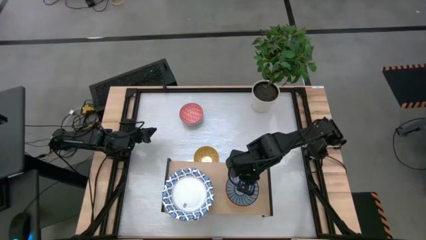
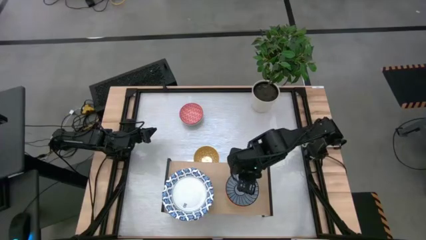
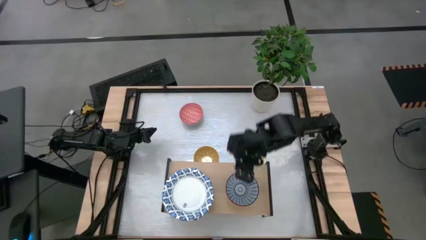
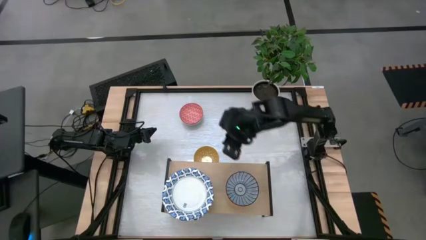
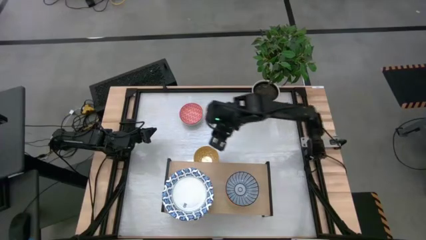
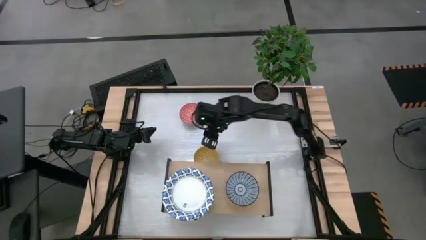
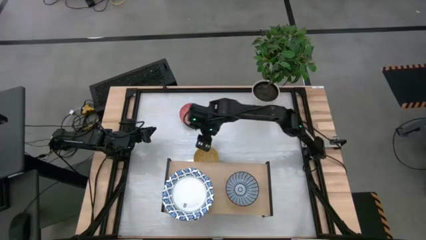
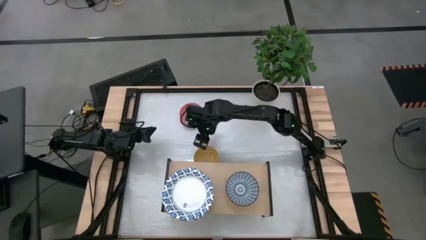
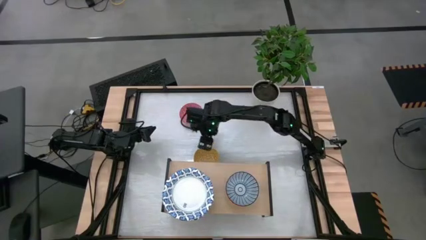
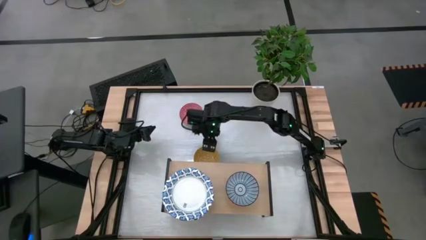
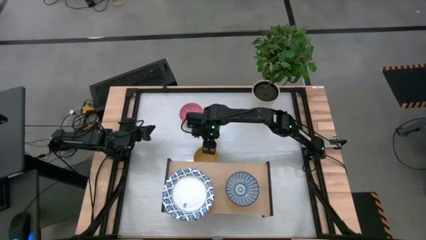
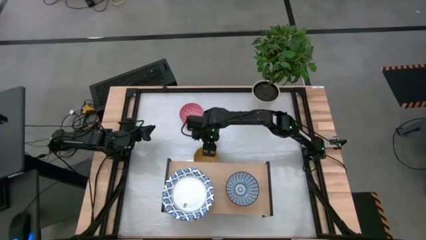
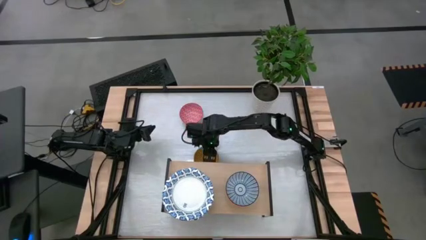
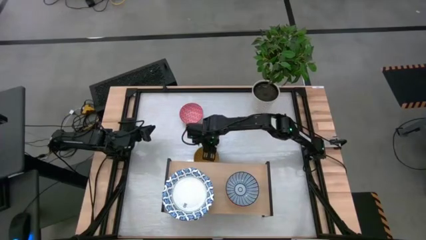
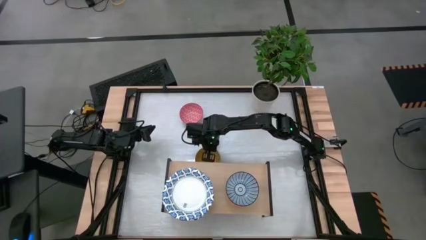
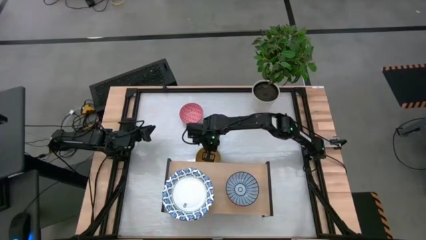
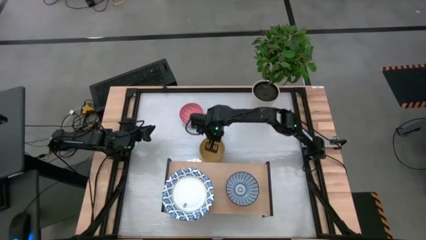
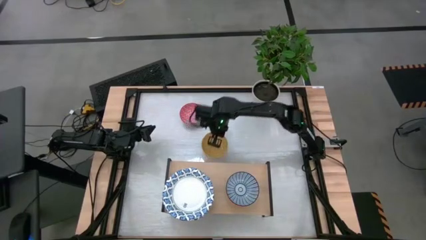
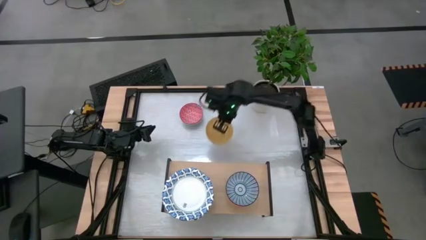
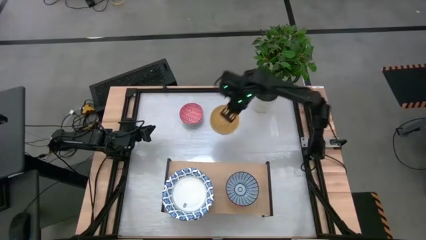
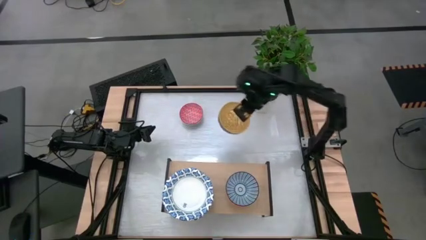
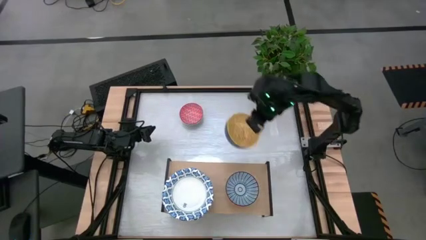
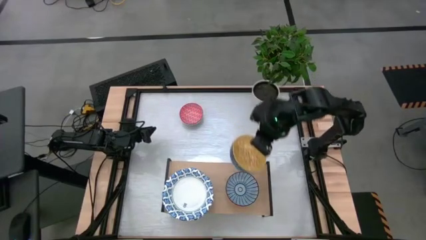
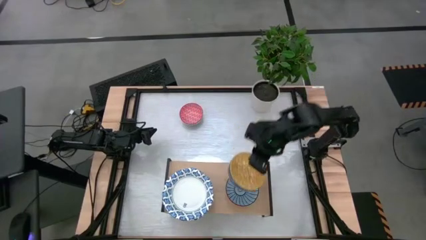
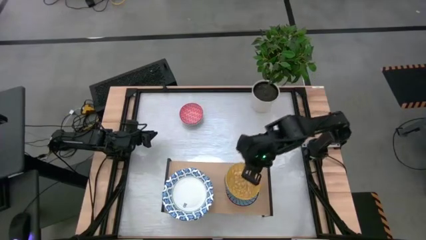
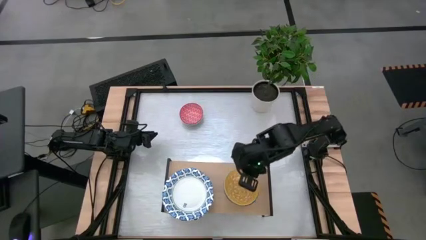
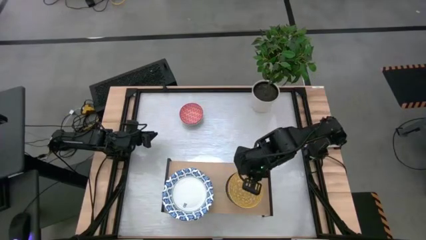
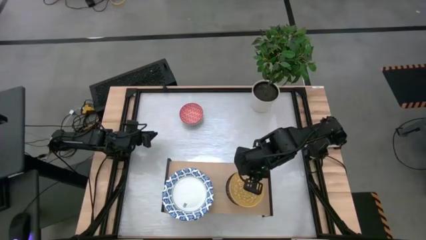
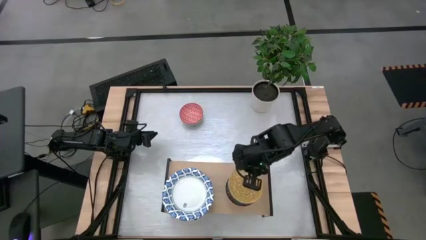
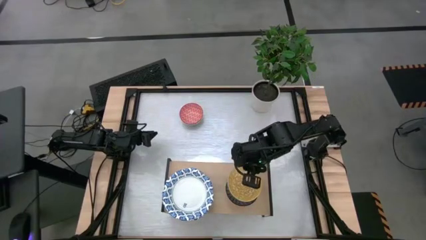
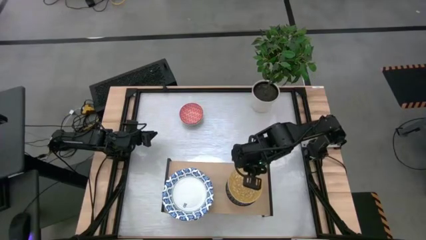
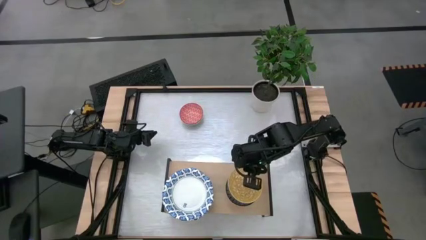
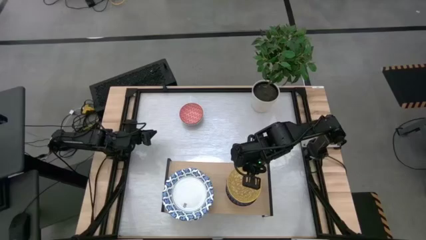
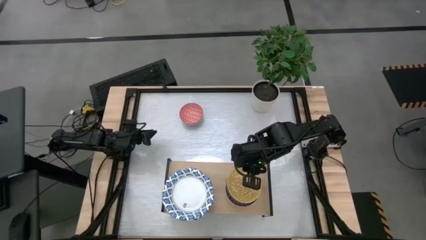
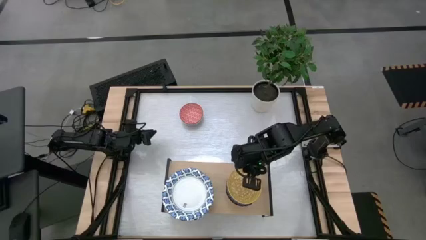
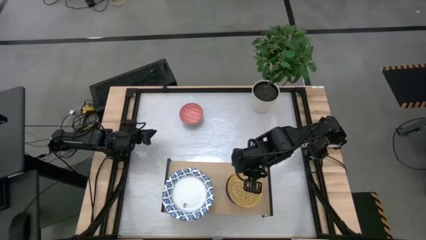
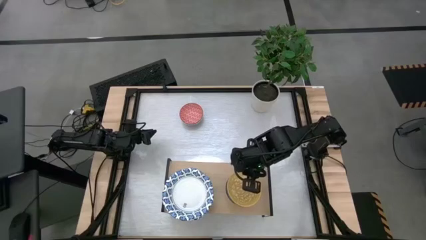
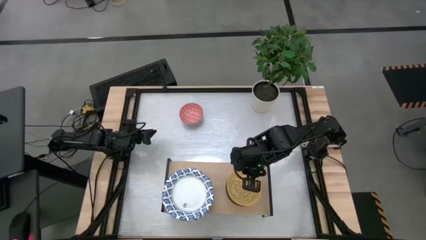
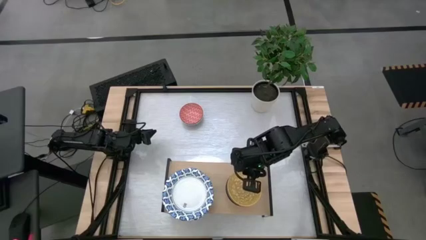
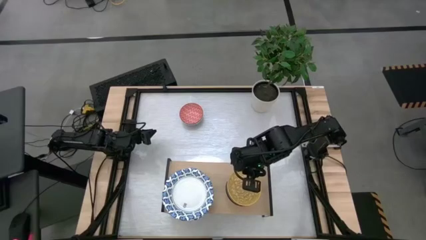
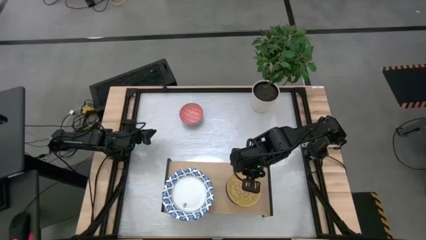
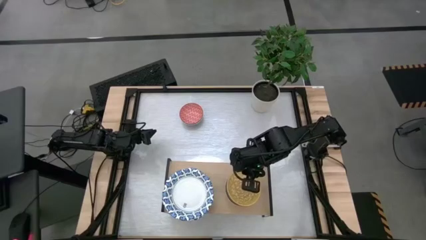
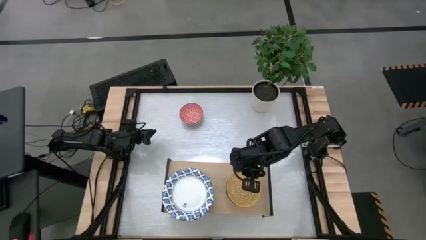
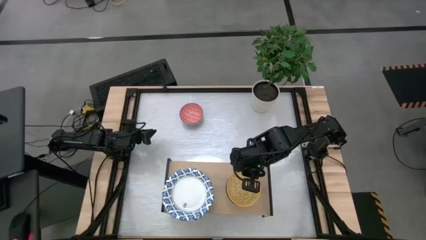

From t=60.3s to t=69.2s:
Task: Place and stack bowls onto a shelf
Stack the yellow patterned bowl on top of the blue patterned bowl on the shelf

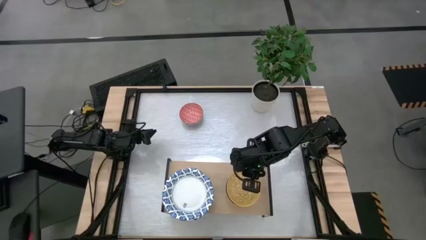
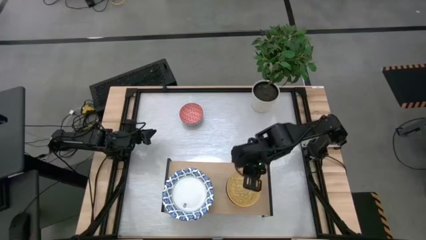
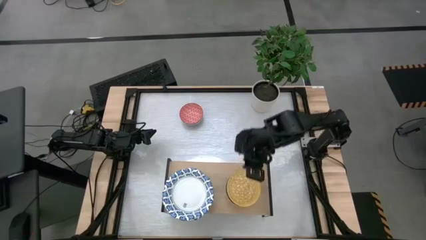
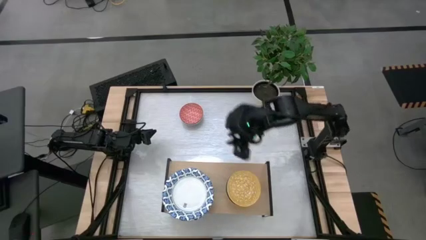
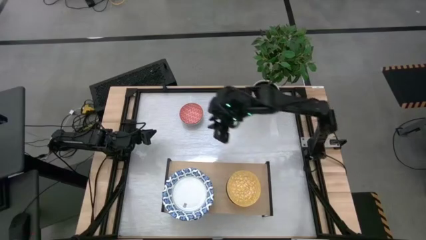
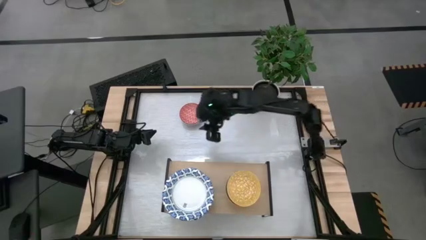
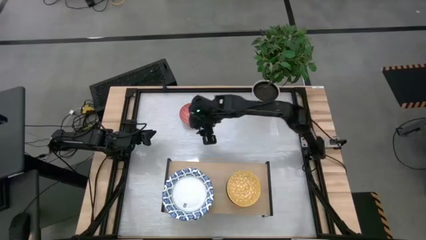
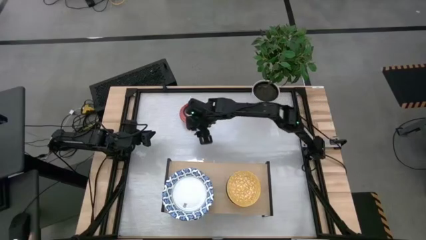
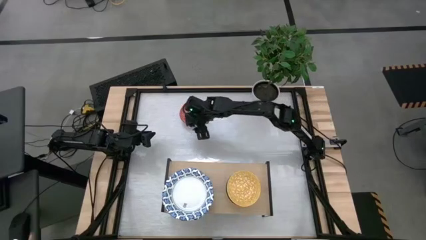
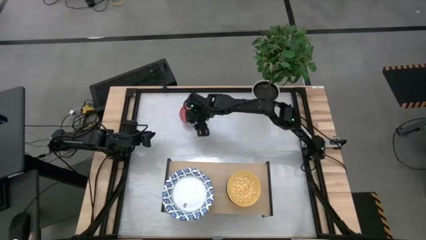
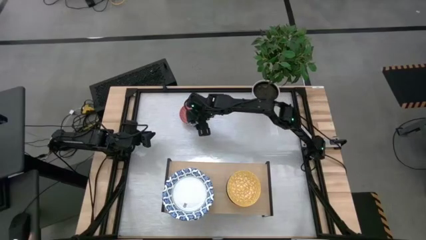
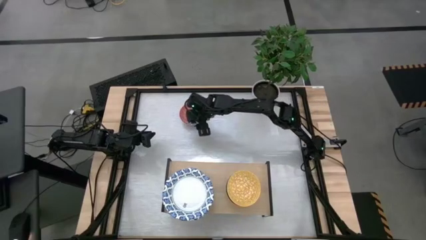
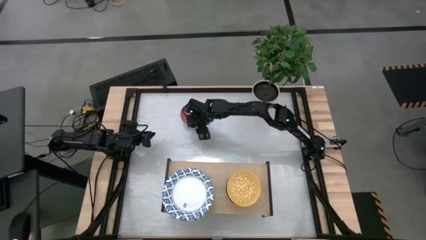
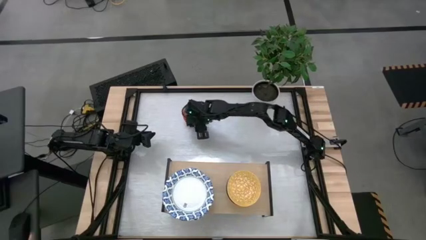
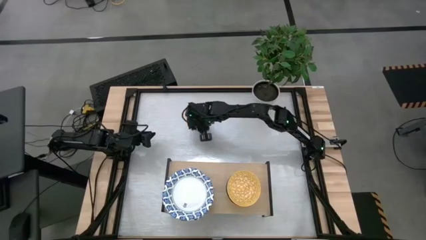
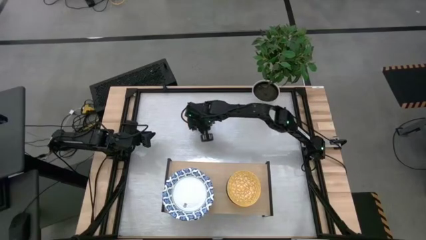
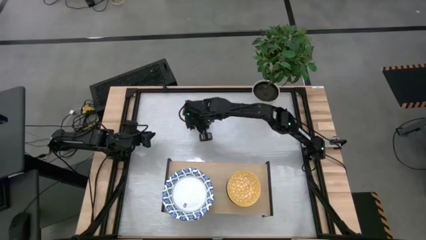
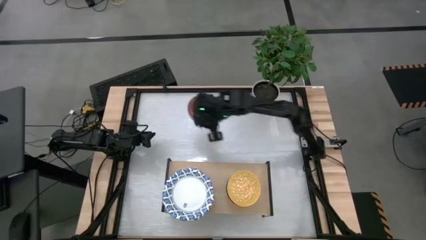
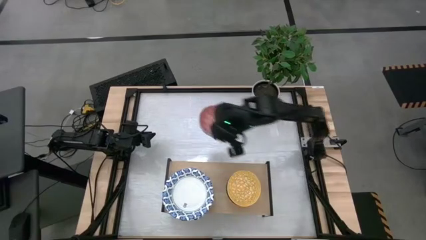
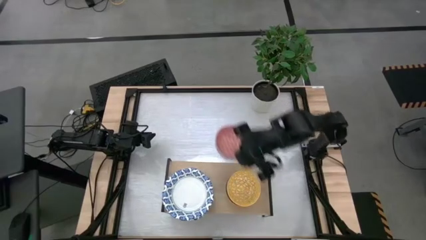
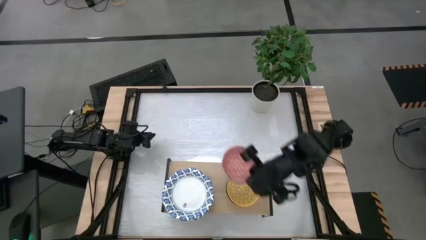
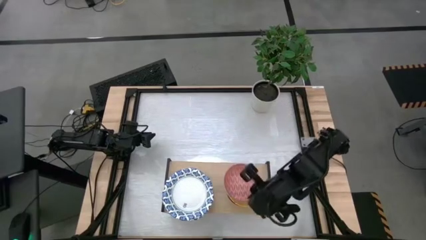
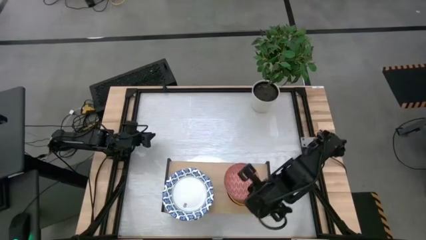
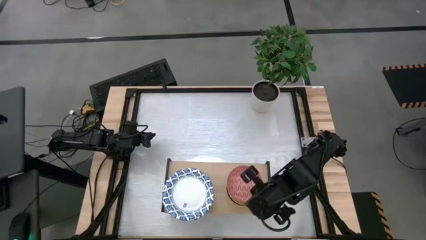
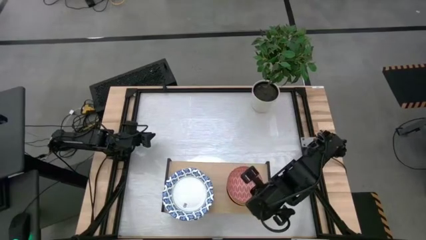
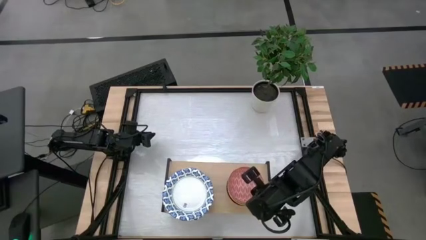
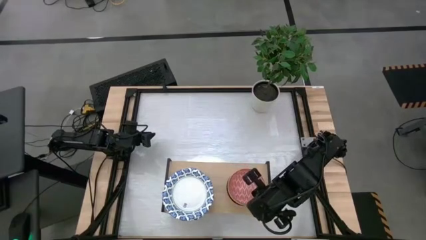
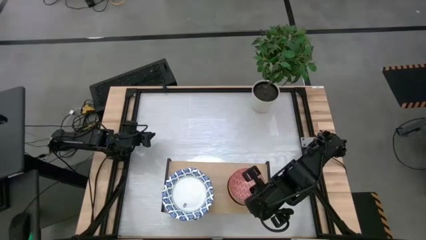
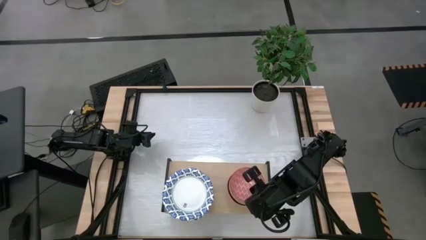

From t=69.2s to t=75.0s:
Stack the red patterned bowl on top of the yellow patterned bowl on the shelf
